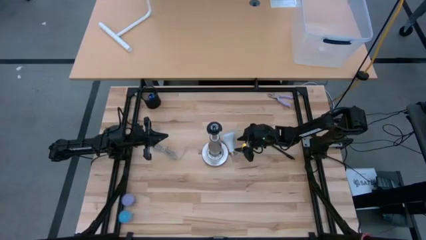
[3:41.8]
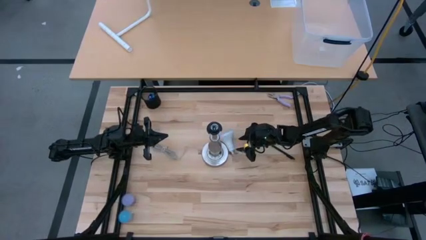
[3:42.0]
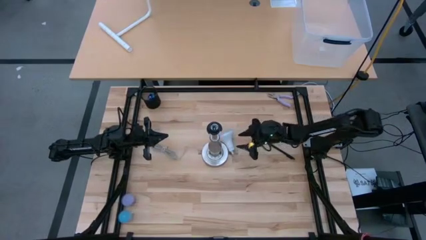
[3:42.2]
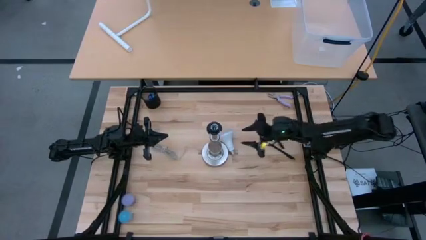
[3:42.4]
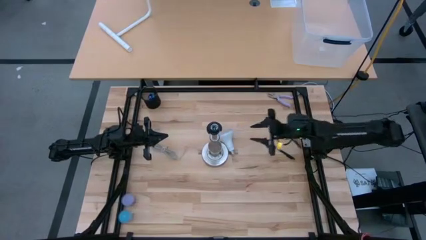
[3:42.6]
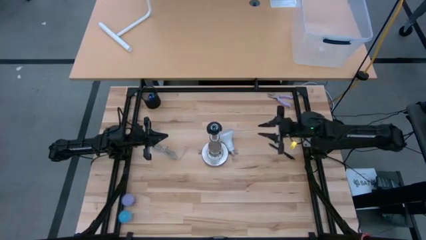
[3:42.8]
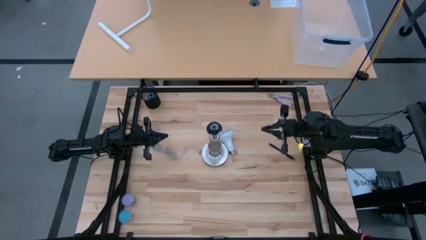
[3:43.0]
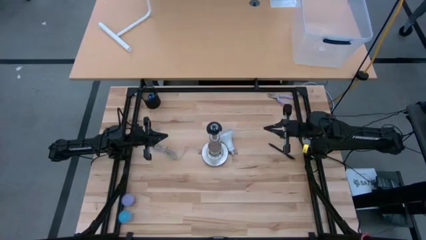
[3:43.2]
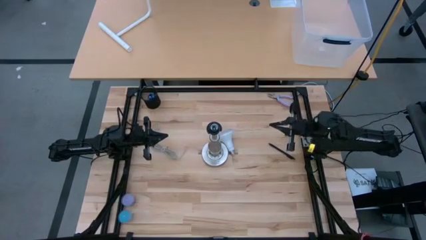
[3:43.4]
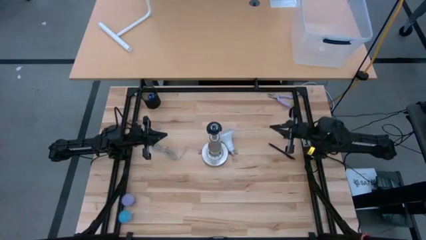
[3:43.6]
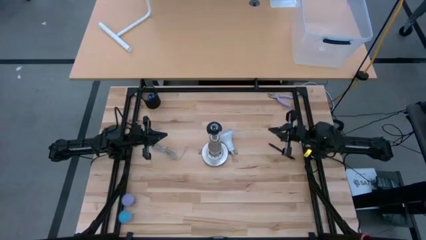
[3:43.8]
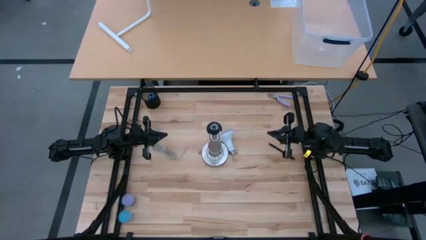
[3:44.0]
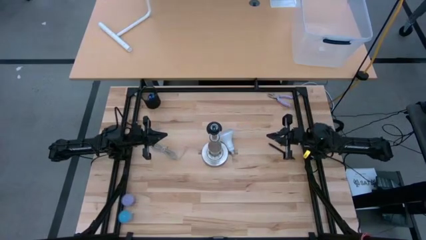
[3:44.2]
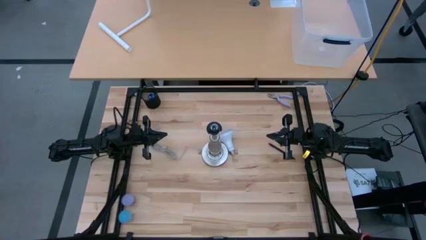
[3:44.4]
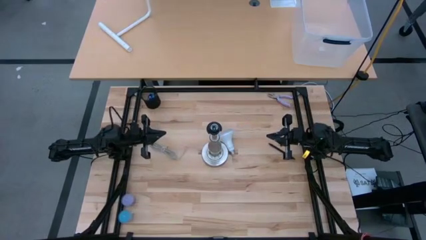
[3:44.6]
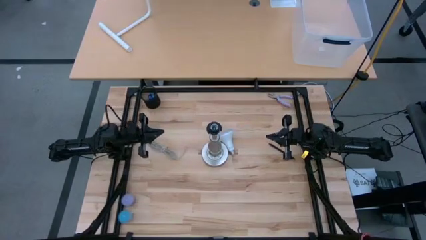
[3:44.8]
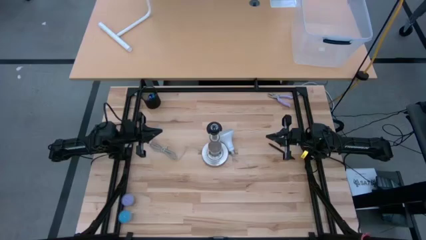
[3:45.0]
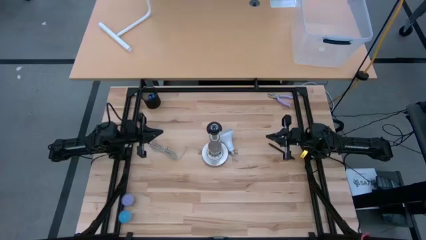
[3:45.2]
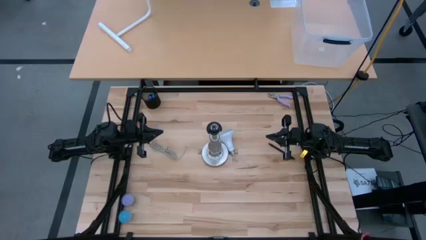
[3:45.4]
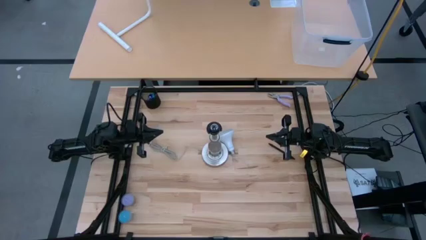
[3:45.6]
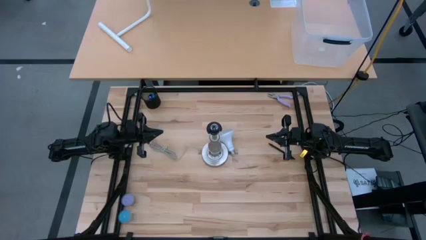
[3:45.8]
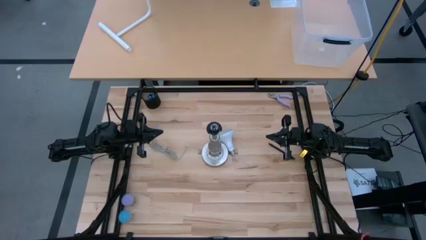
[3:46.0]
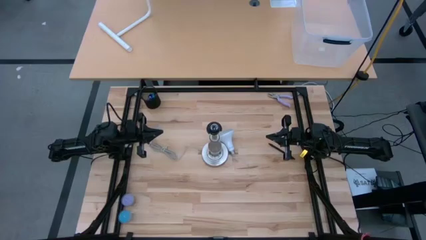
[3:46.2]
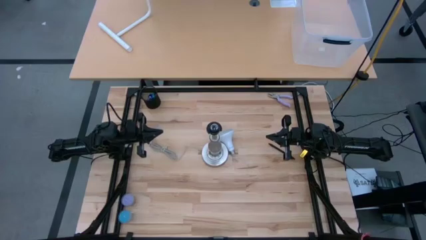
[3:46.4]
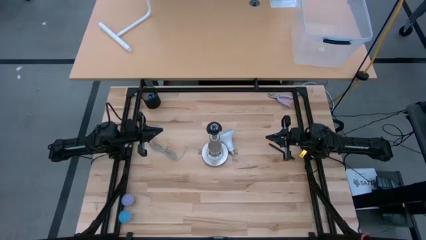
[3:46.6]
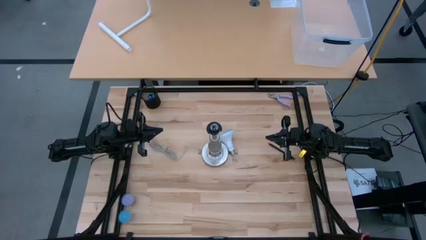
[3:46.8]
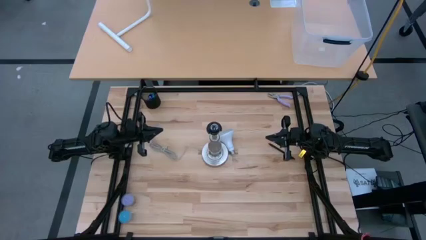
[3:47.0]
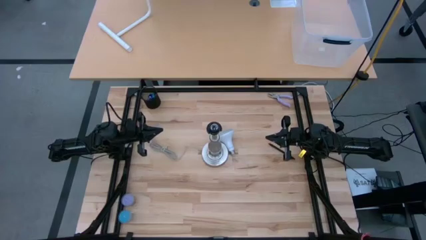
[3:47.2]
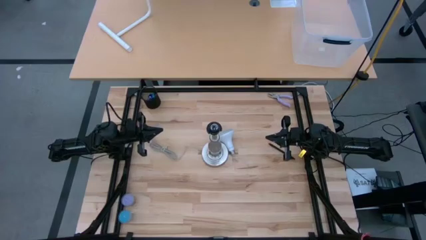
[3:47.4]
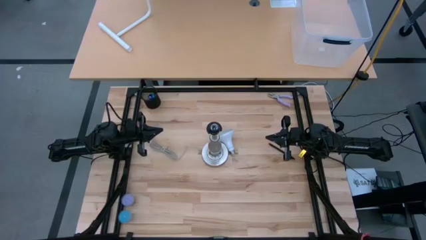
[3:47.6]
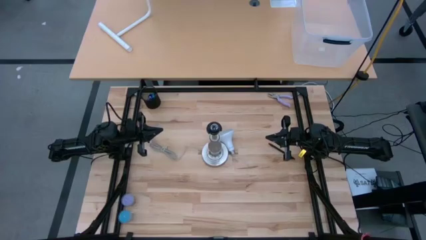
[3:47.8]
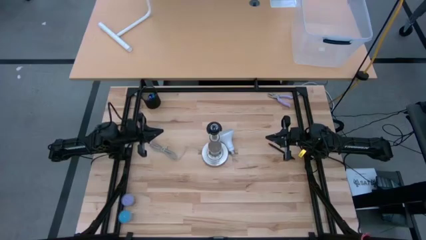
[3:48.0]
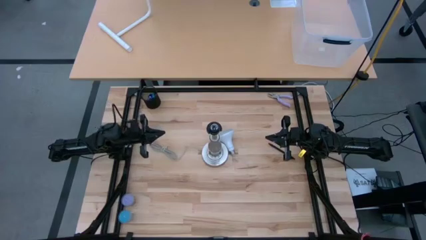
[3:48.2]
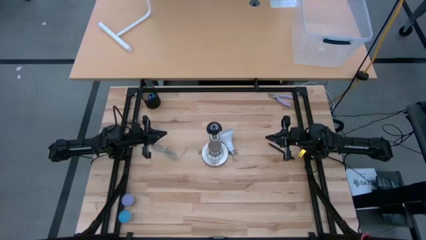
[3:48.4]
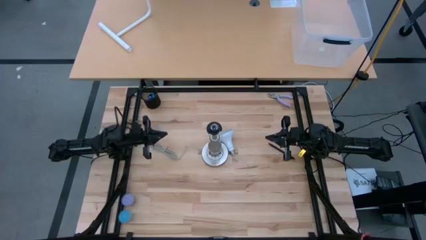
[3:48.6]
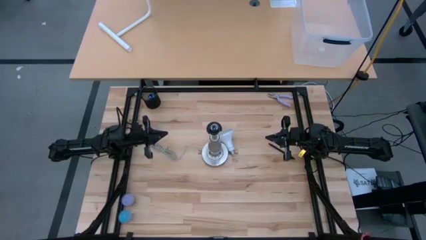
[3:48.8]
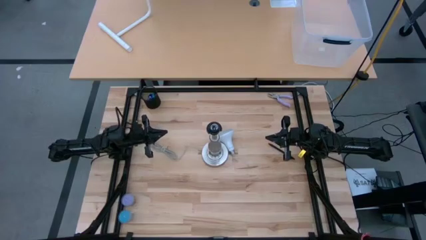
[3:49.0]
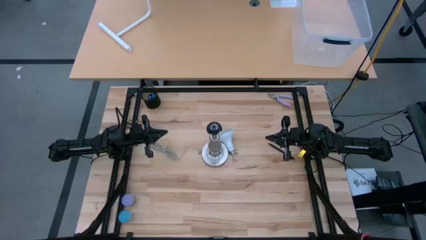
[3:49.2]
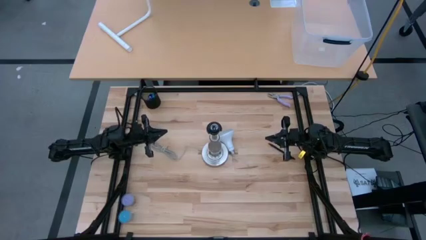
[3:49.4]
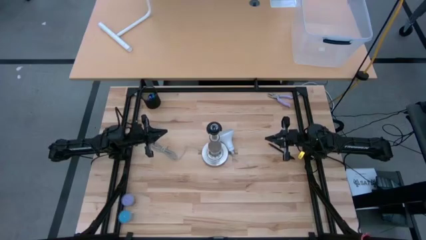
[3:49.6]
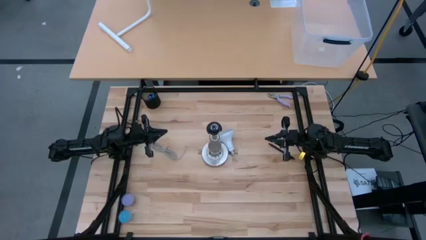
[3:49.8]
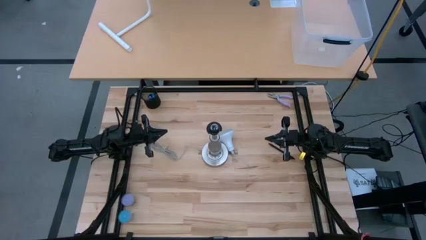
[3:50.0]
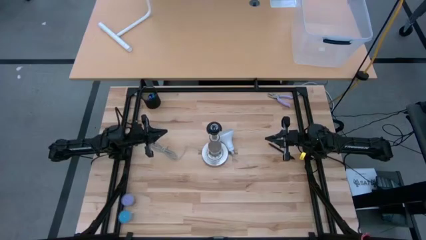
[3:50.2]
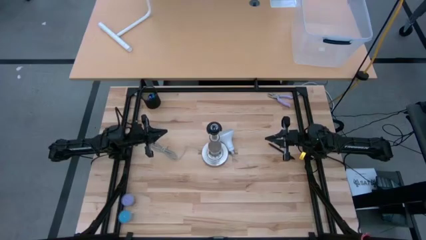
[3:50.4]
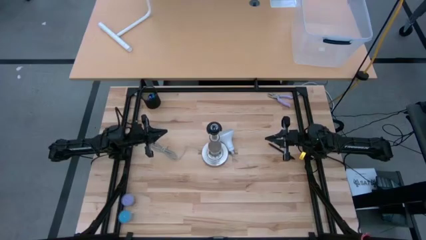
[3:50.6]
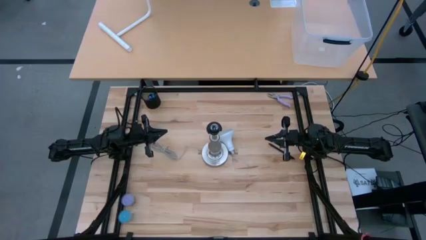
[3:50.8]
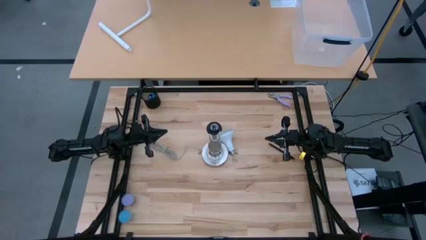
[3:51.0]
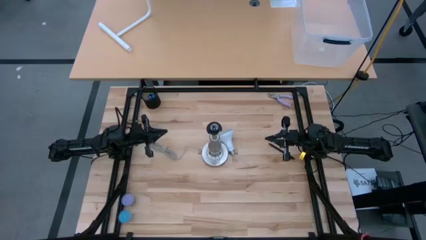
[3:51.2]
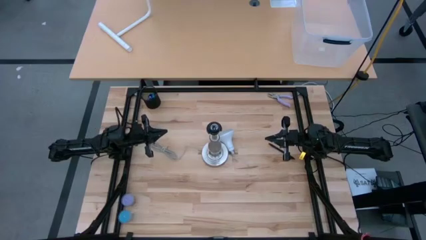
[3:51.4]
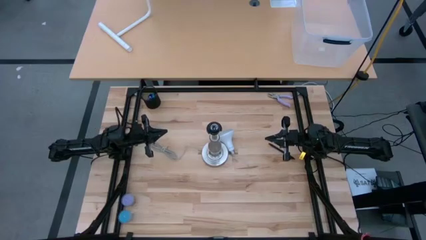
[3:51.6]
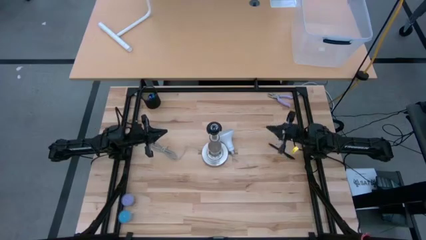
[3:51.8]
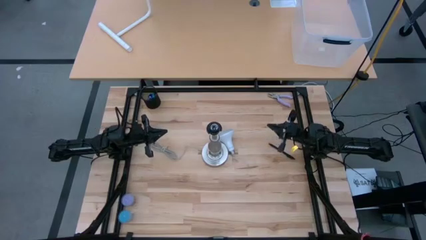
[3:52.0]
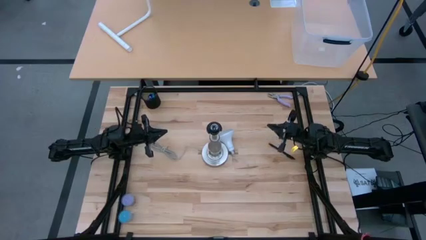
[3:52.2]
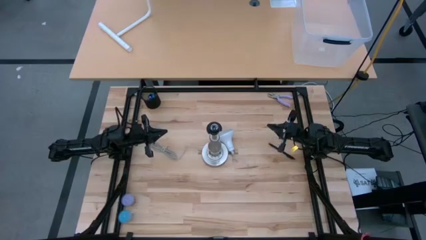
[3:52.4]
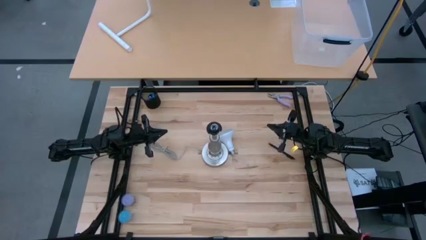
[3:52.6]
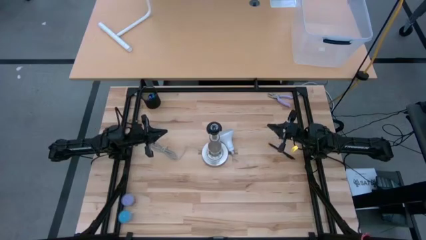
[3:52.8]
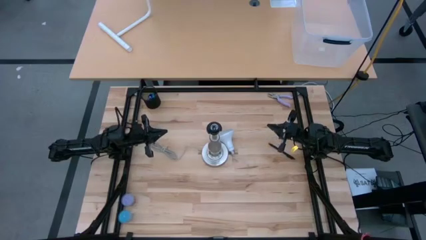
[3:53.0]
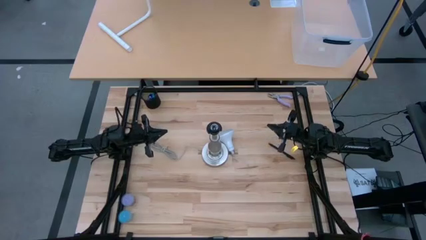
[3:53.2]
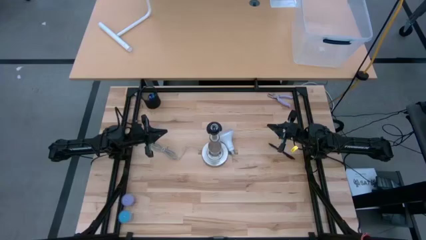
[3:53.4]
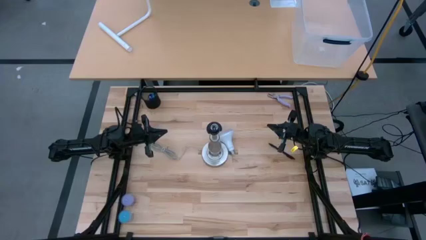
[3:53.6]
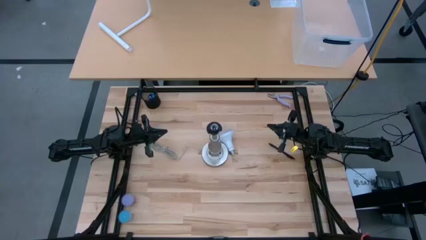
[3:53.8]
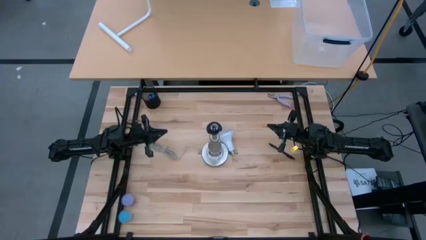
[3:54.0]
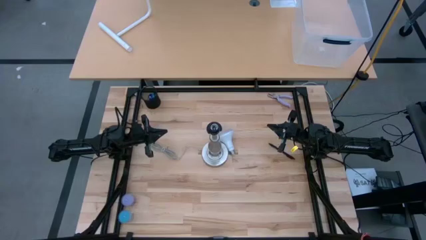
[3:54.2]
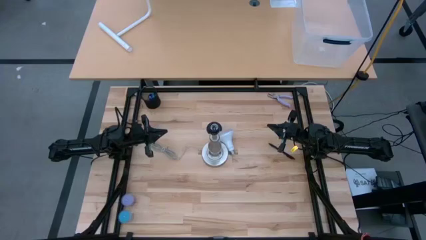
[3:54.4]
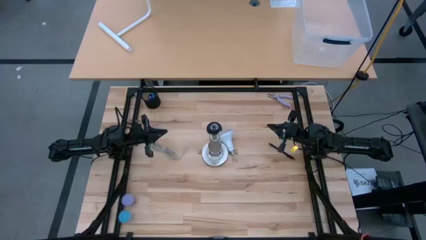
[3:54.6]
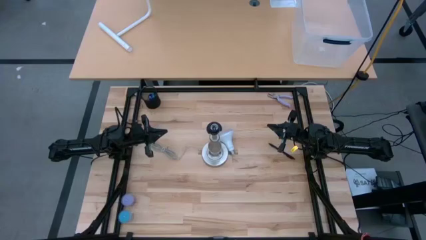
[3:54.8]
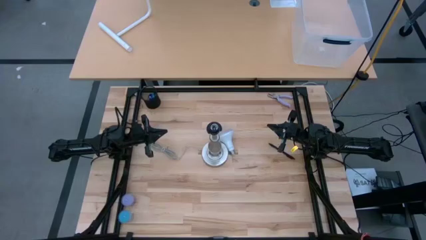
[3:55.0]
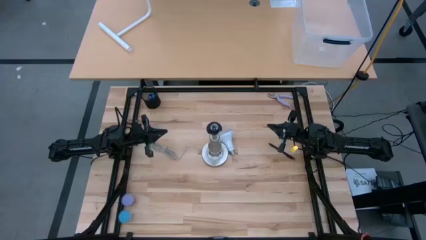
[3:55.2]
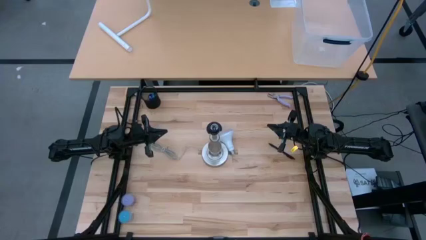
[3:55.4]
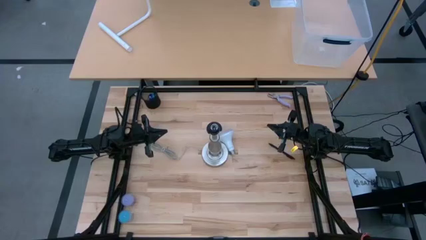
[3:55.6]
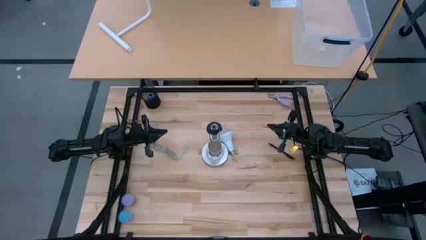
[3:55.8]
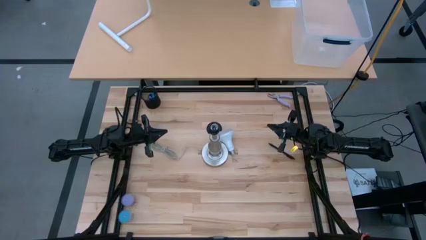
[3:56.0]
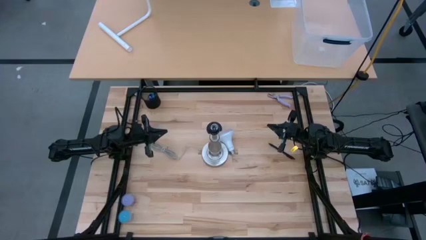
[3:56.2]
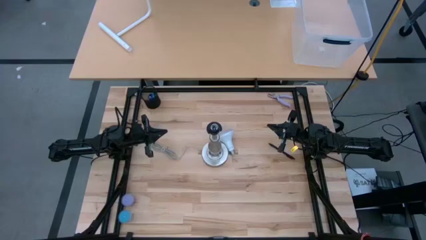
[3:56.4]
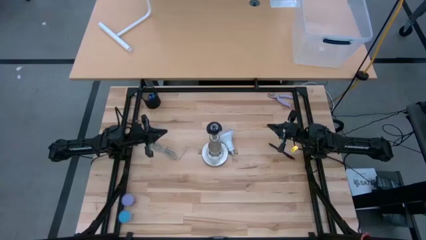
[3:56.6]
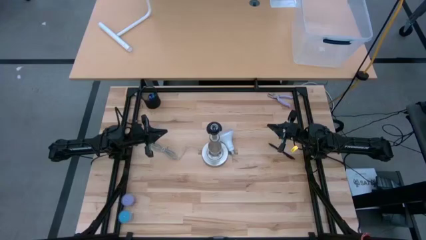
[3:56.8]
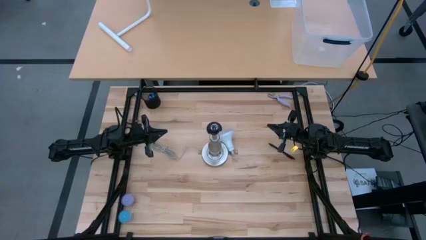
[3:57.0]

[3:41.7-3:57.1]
Task: Screw lightbulb
Return to Home Position
